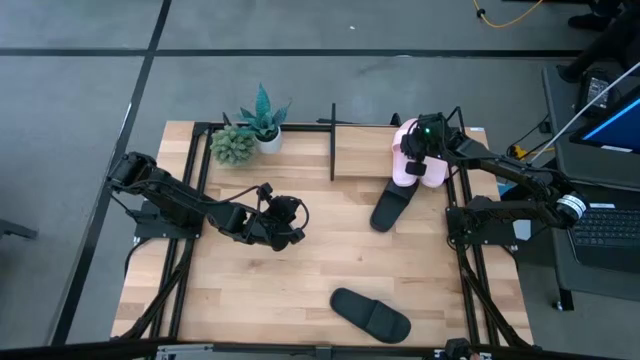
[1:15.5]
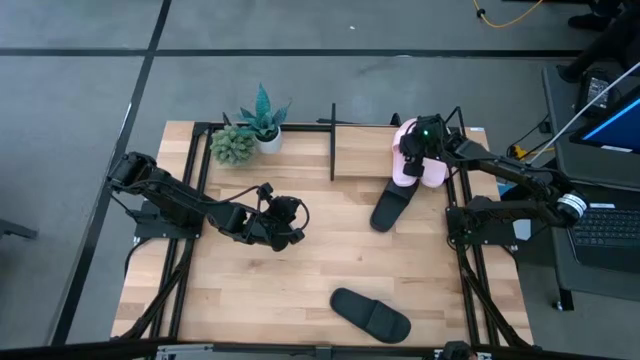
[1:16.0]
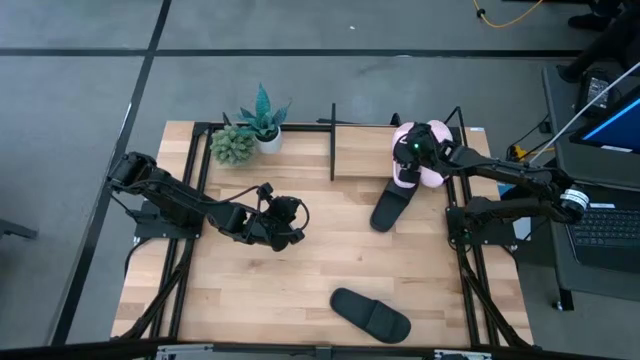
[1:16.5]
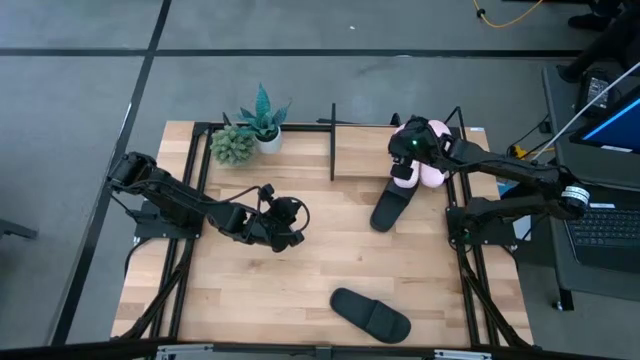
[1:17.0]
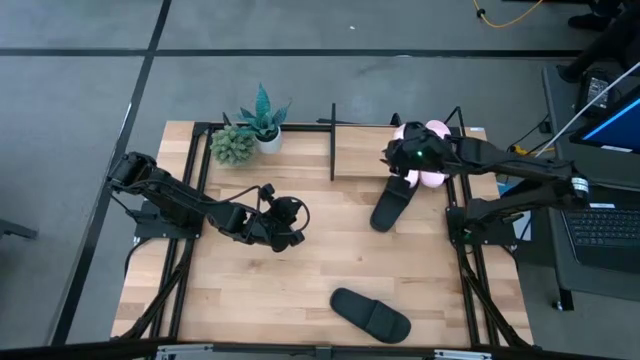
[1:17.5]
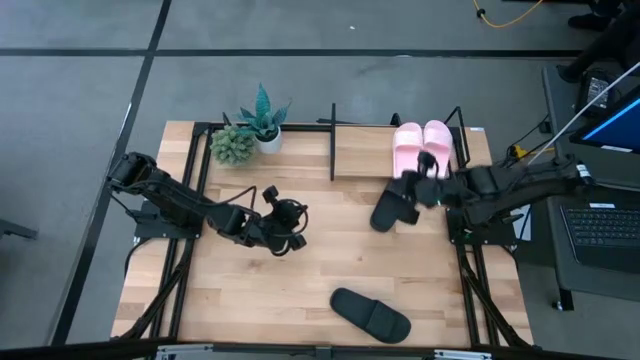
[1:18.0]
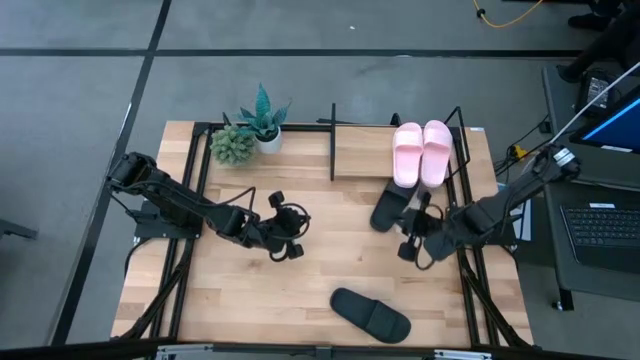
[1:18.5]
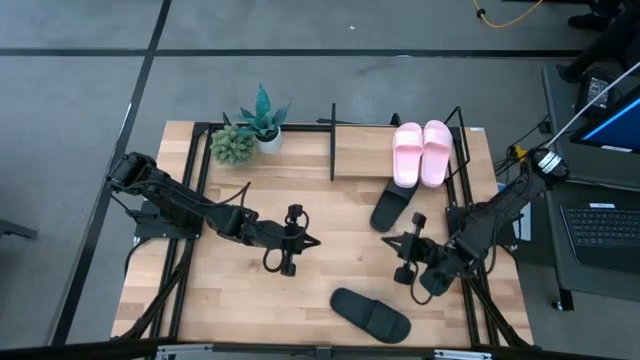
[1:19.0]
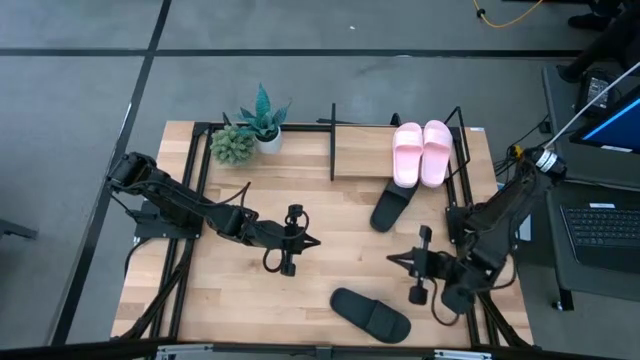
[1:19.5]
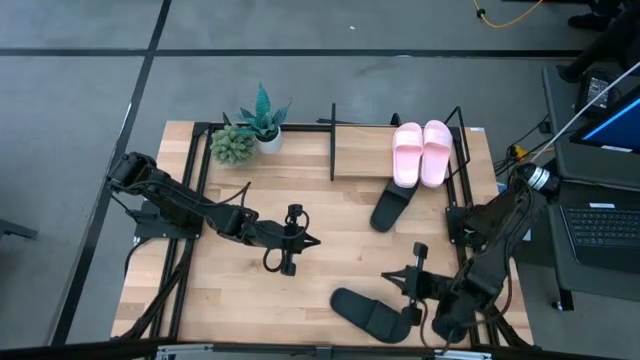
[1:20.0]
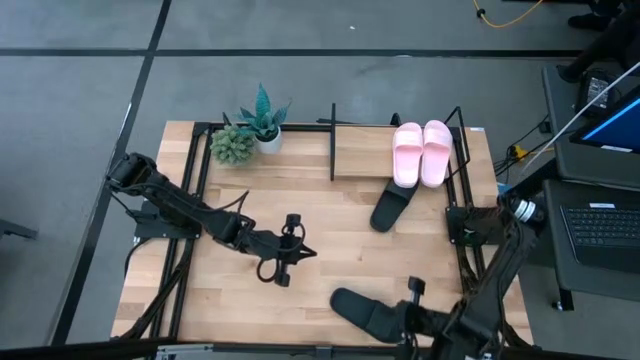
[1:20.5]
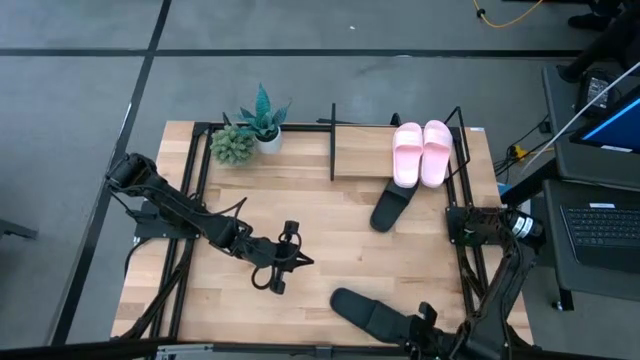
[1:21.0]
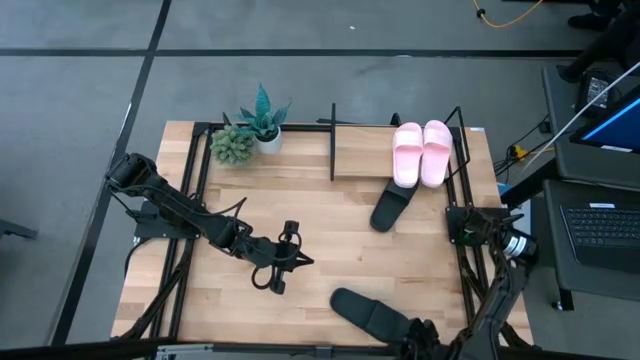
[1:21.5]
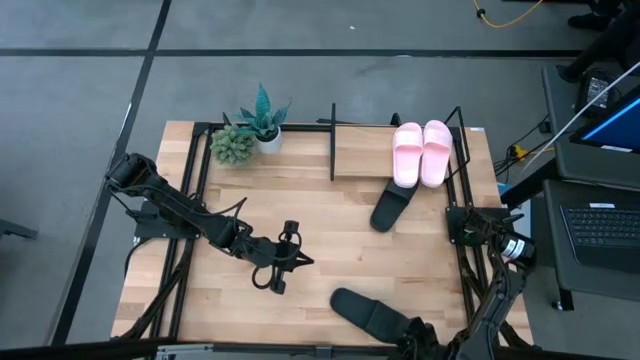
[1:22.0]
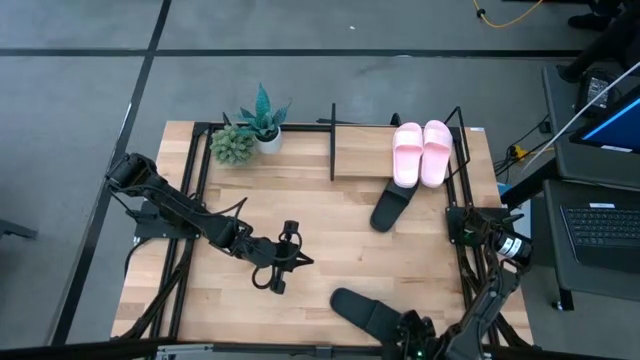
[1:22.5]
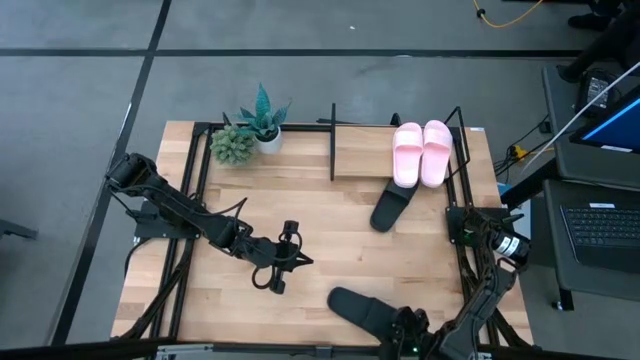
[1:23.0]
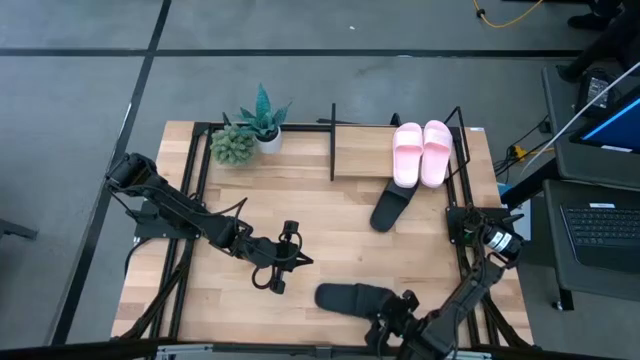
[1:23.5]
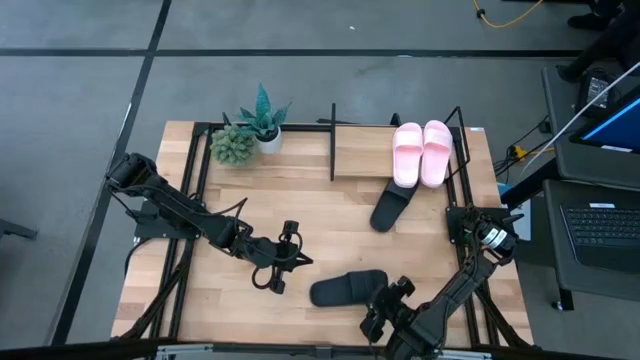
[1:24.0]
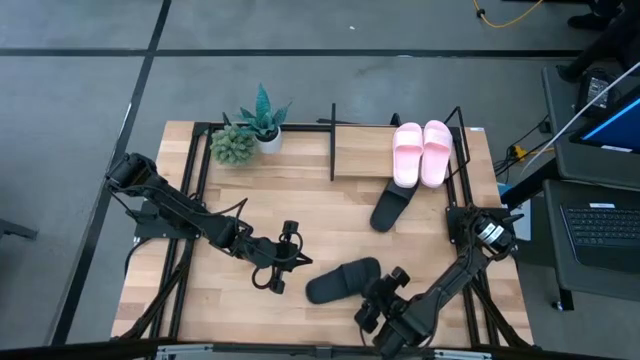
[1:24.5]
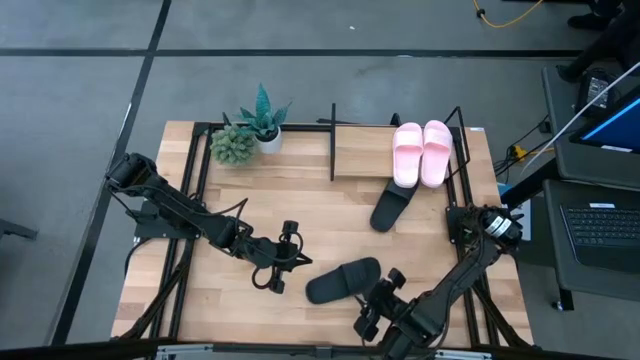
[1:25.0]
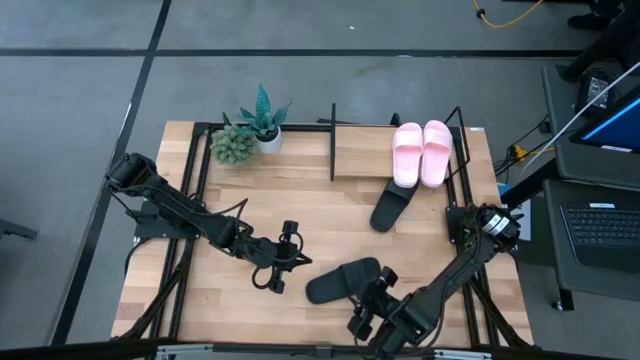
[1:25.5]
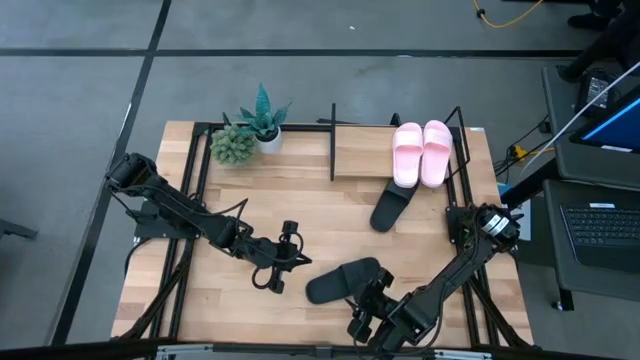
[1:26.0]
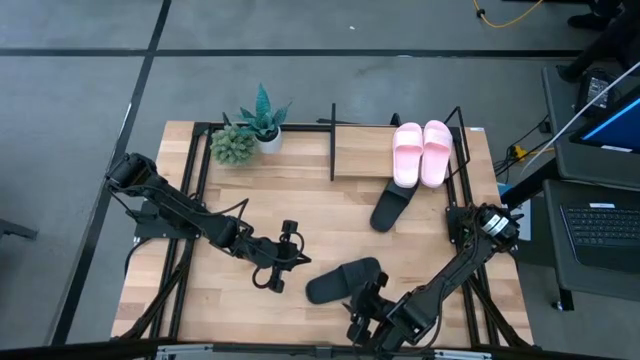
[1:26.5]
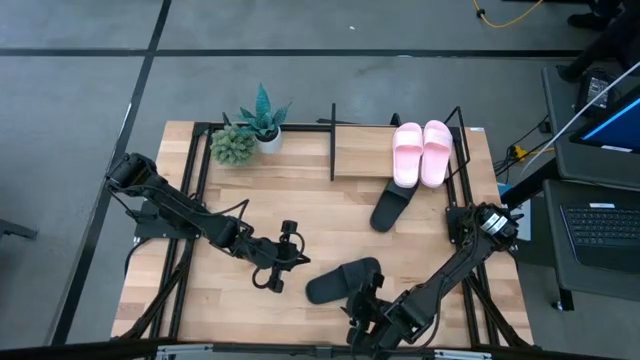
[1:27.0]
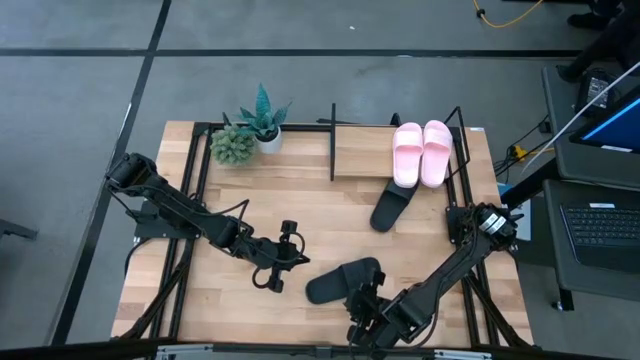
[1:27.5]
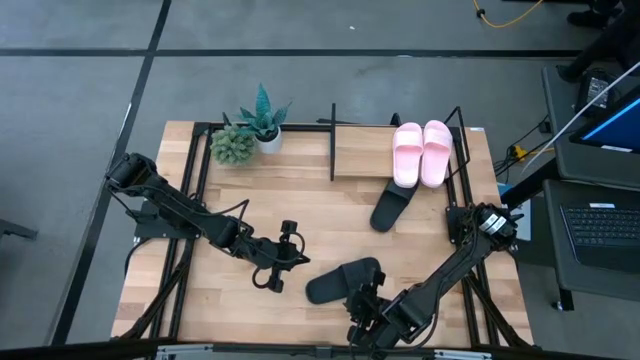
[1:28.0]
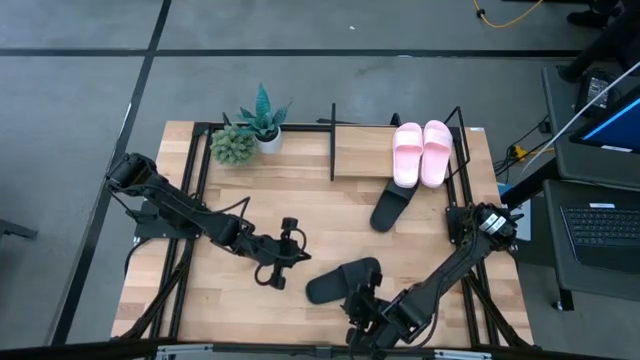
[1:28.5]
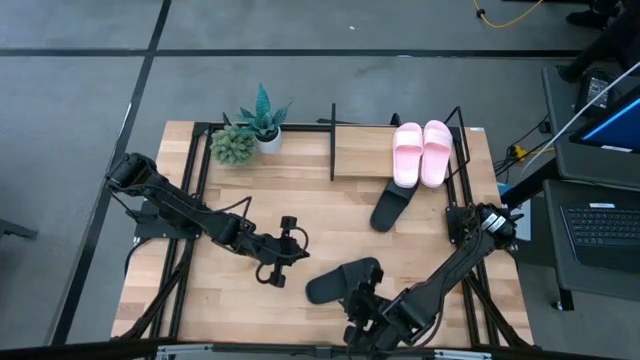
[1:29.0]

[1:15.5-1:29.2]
Task: Pick and place slides into the shelf
Put the bottom black slide on the shelf
